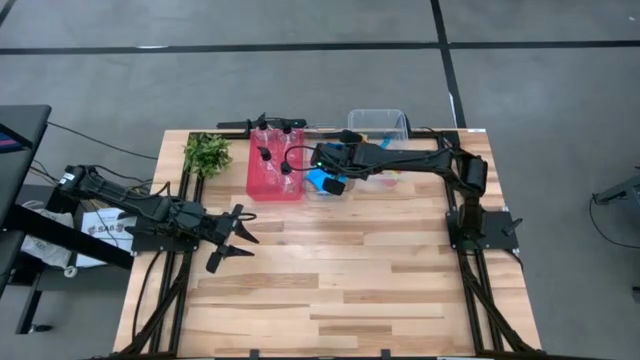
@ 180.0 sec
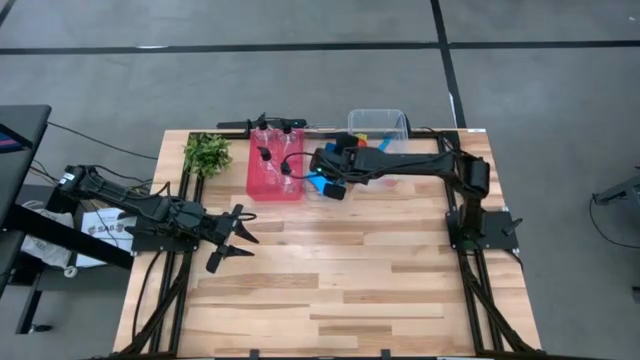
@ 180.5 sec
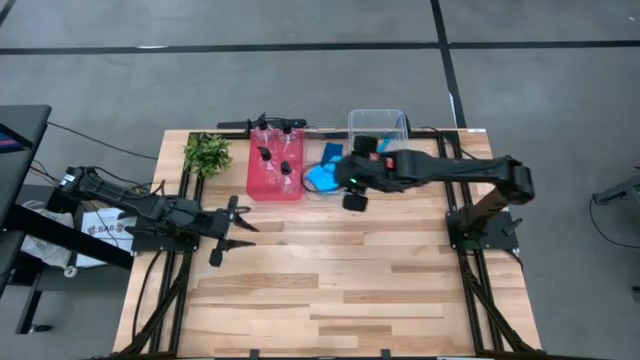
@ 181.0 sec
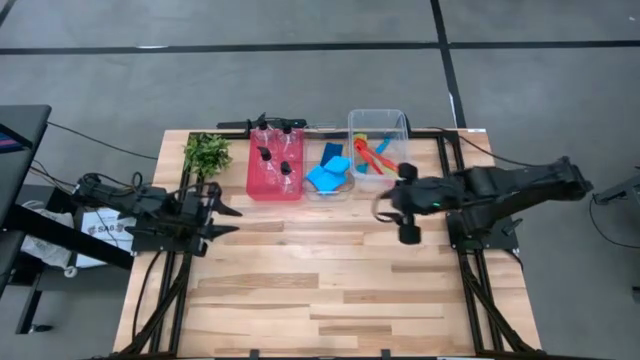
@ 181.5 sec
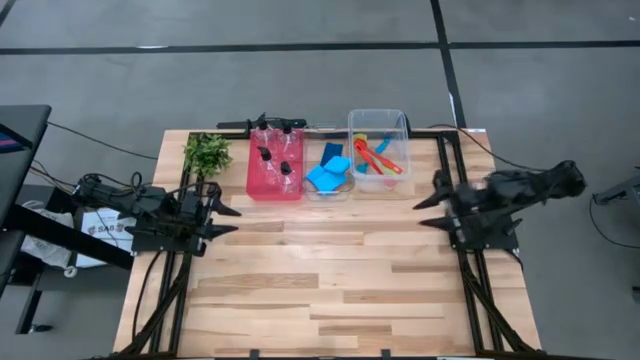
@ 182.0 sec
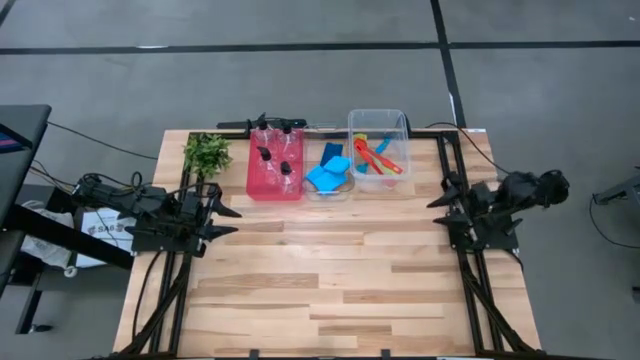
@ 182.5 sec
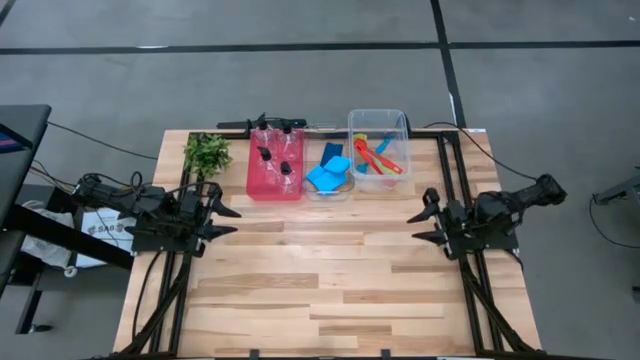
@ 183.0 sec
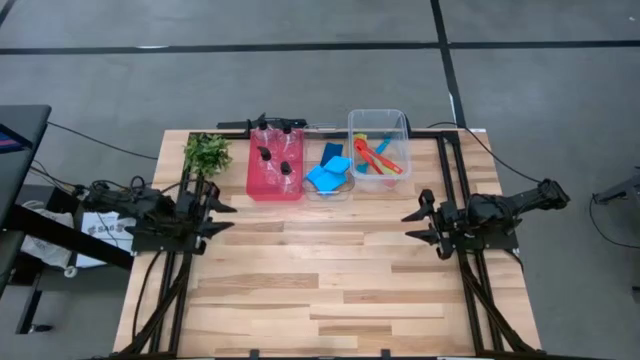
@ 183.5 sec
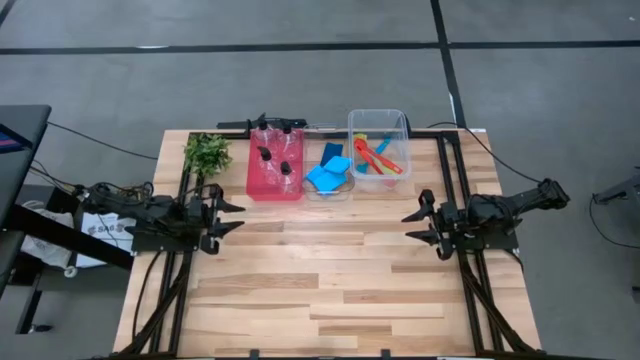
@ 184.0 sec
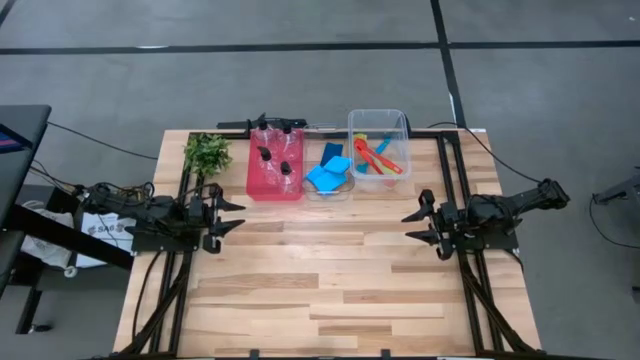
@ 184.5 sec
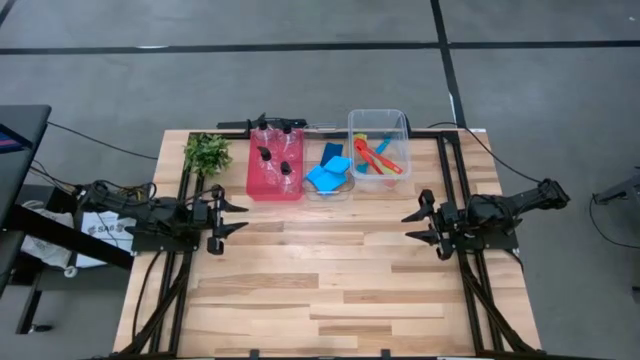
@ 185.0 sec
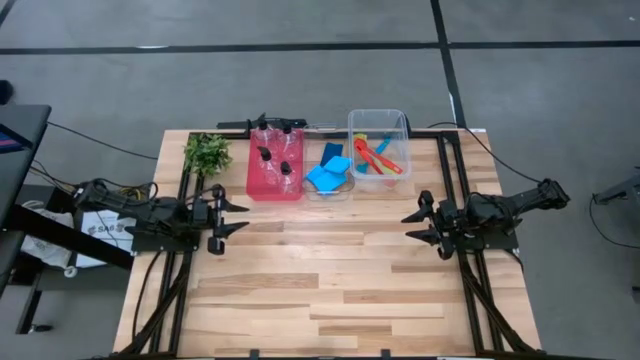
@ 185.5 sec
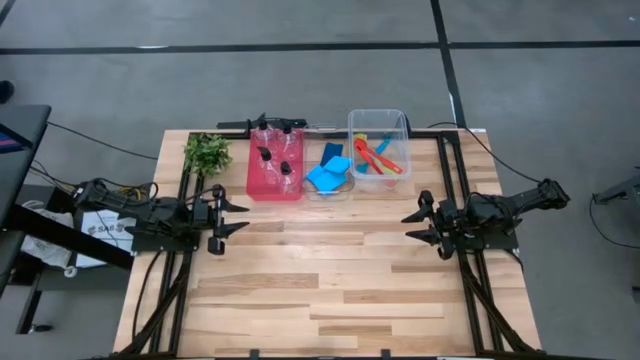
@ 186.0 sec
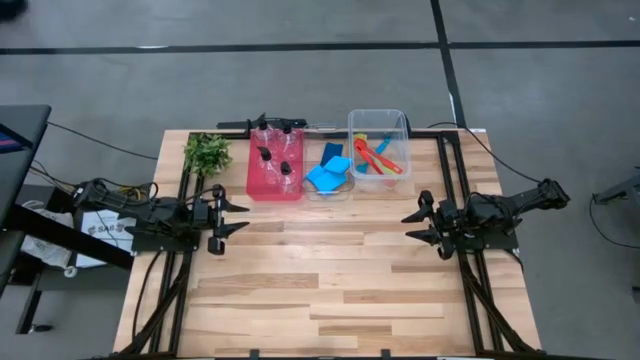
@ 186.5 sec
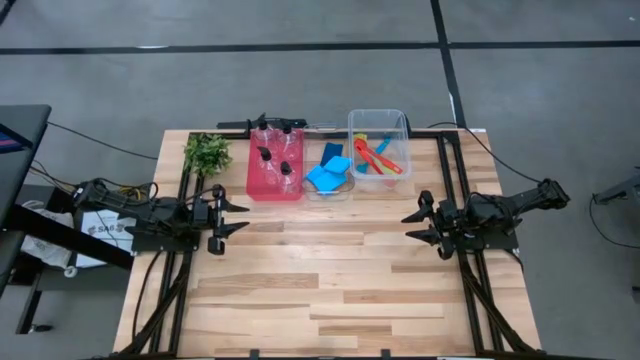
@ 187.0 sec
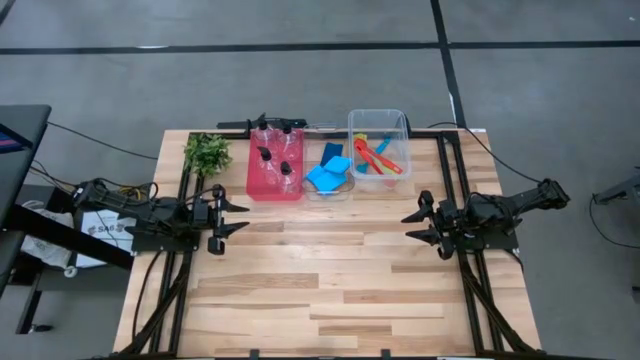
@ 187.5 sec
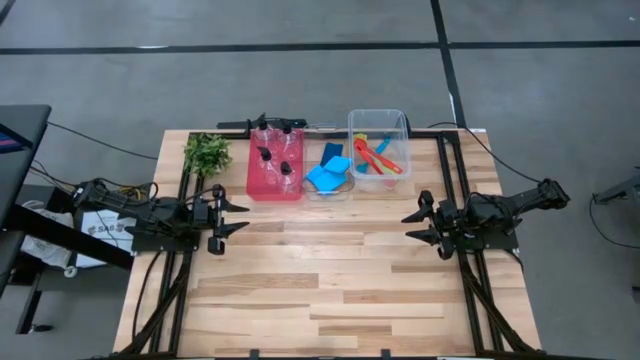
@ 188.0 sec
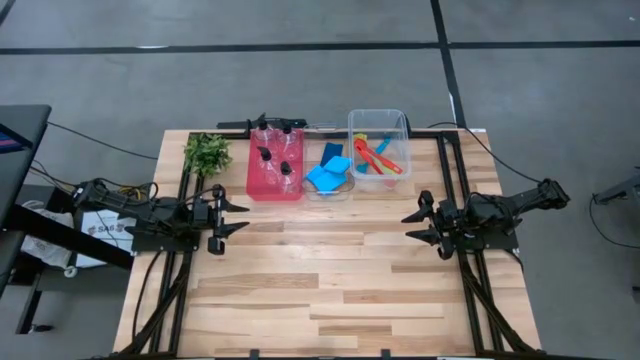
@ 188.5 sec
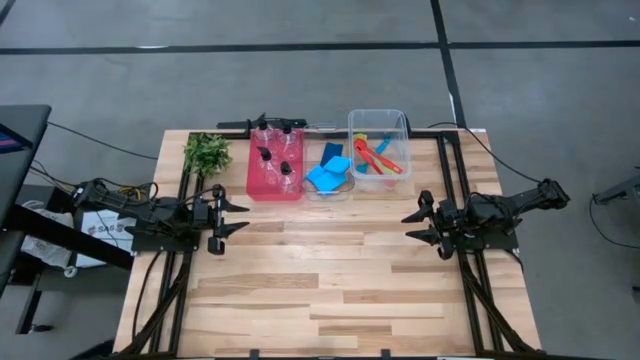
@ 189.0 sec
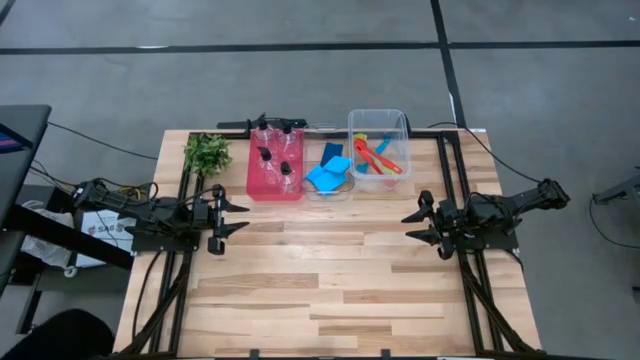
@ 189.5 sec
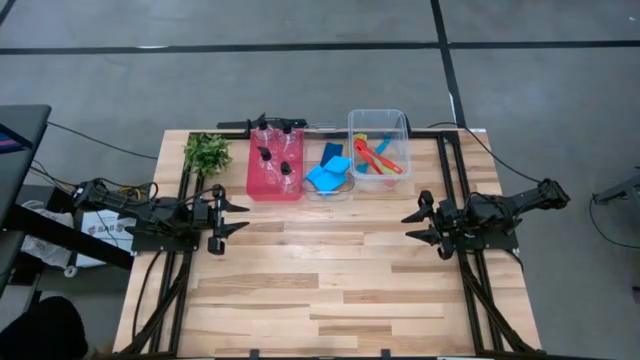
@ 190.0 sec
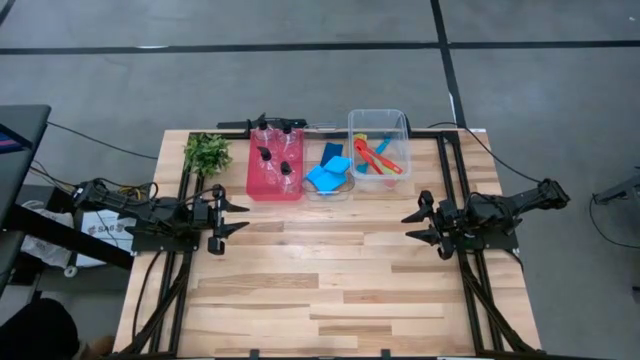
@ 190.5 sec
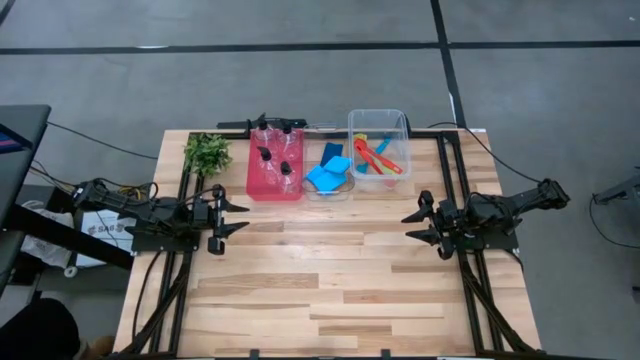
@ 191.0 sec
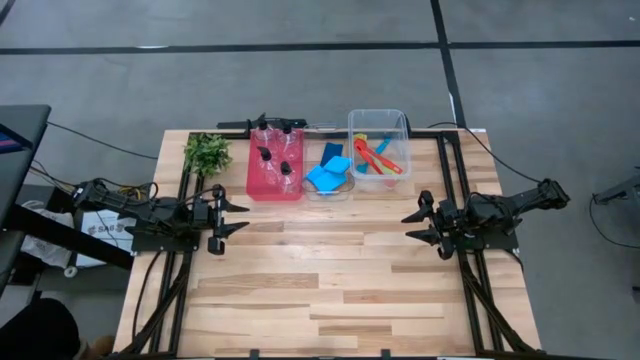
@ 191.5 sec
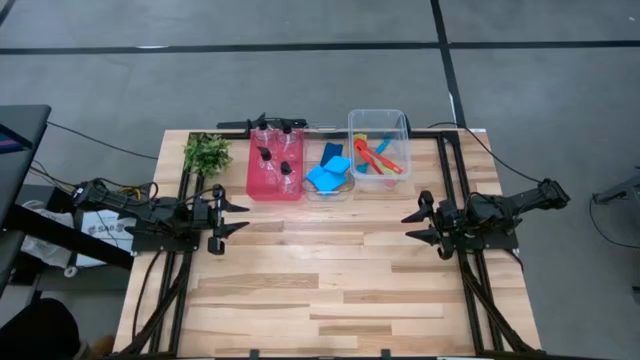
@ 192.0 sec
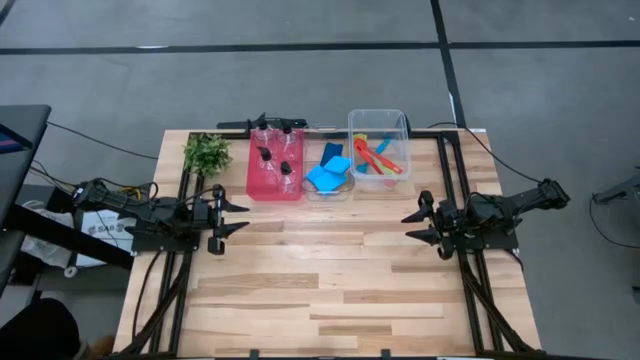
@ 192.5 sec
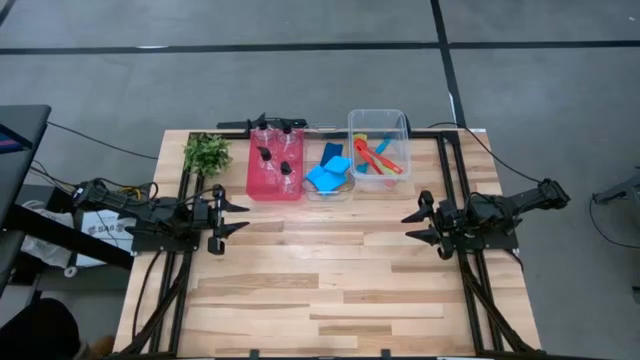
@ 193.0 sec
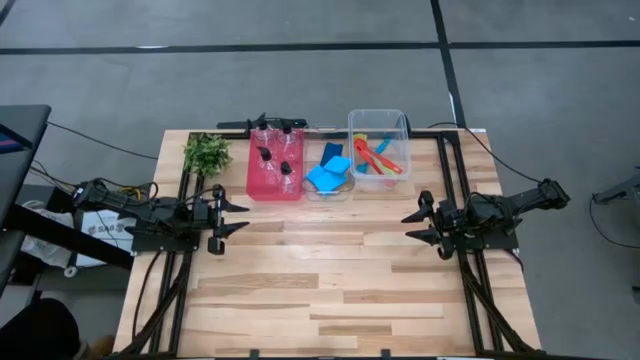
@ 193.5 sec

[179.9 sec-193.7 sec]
Task: Pick & Place Kitchen Sink Supplies
Return to Home Position

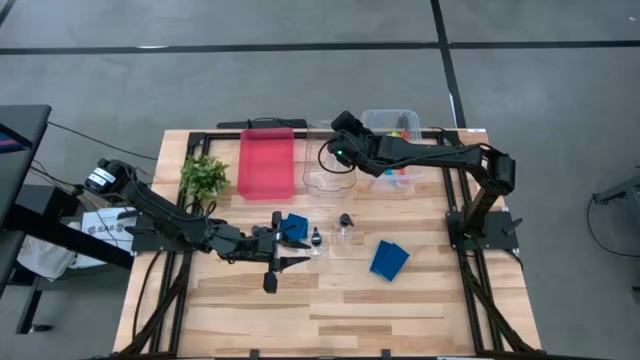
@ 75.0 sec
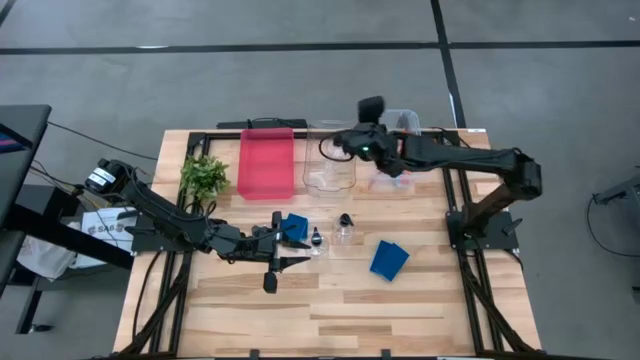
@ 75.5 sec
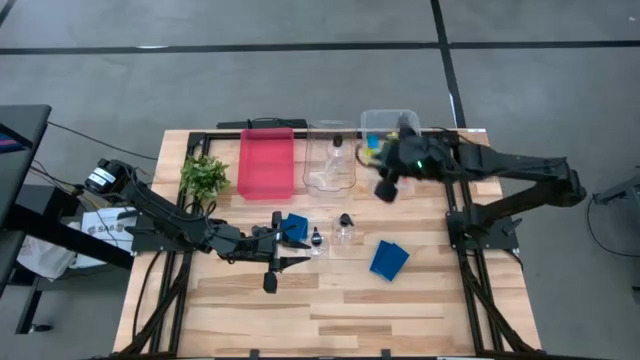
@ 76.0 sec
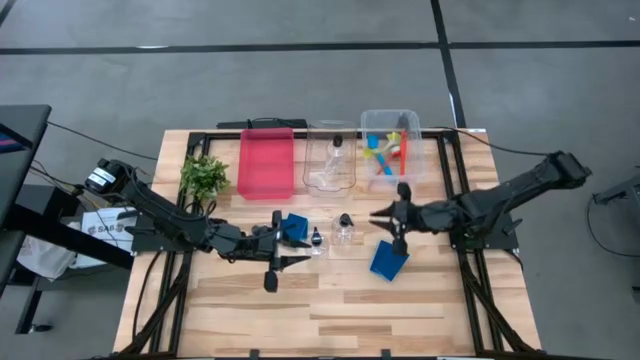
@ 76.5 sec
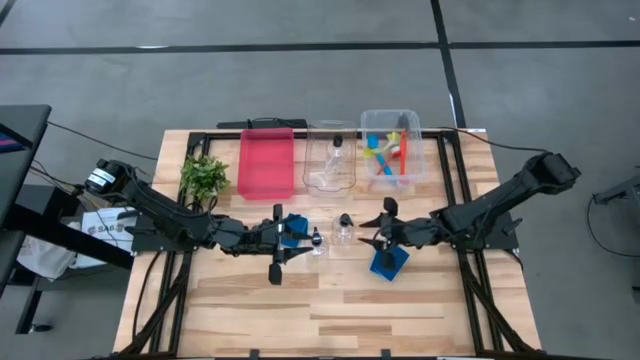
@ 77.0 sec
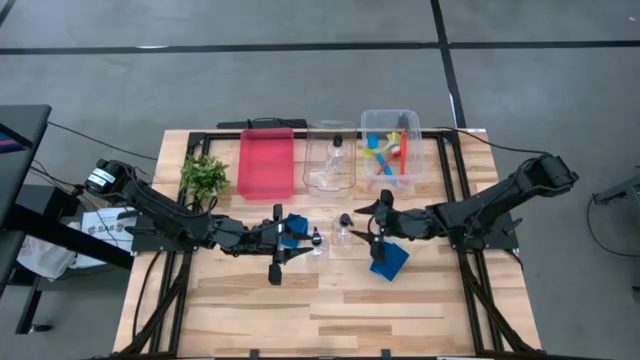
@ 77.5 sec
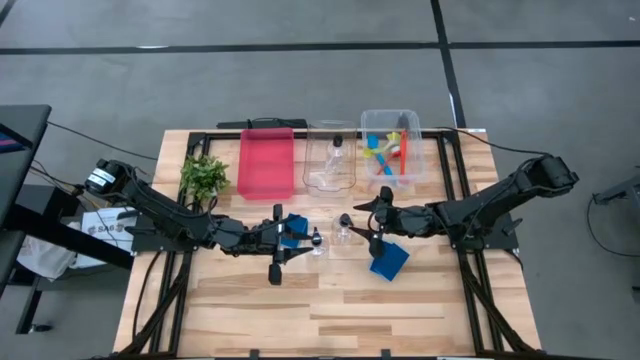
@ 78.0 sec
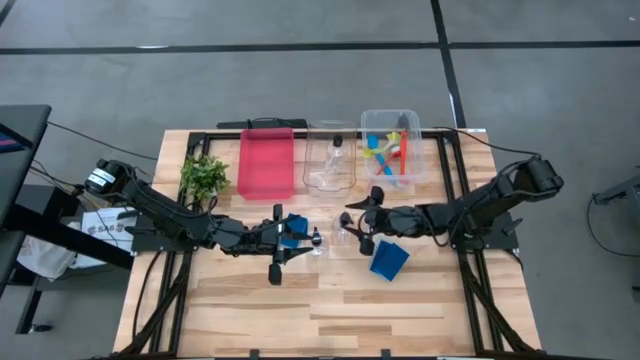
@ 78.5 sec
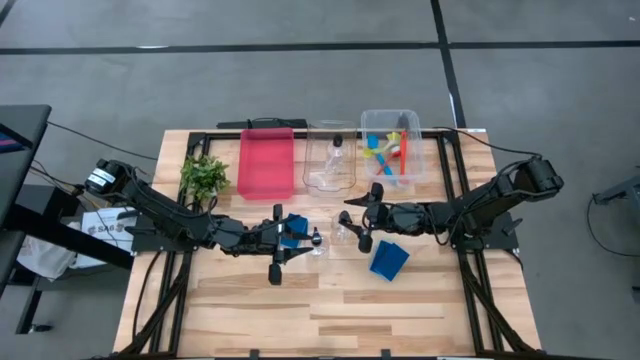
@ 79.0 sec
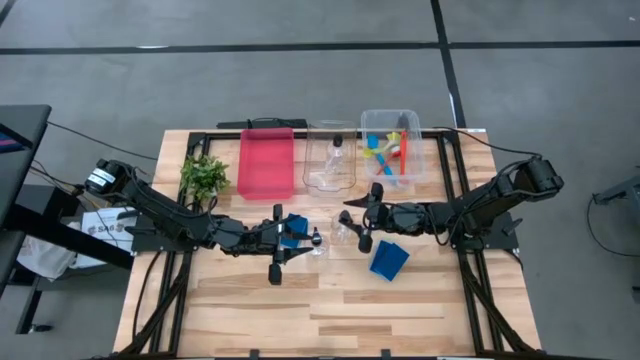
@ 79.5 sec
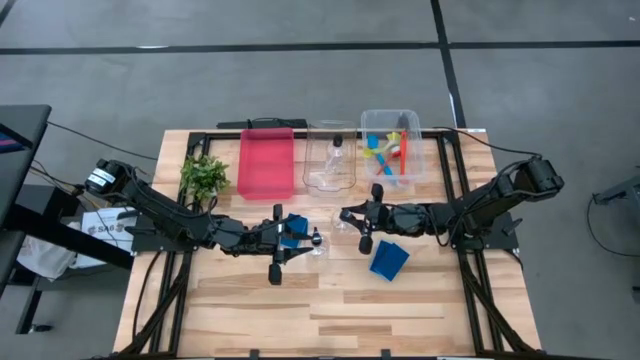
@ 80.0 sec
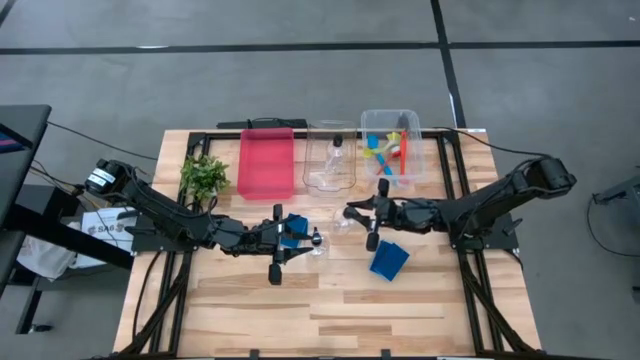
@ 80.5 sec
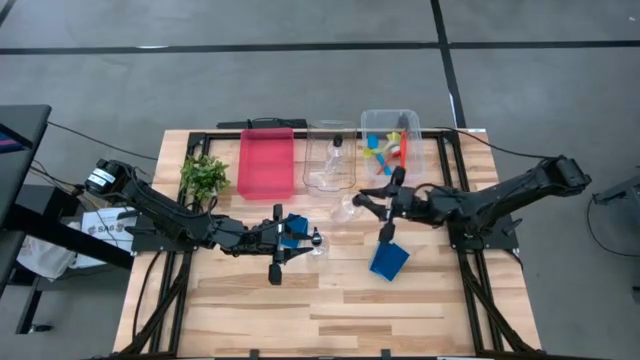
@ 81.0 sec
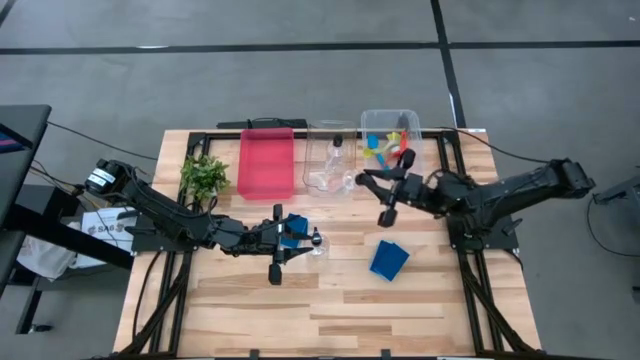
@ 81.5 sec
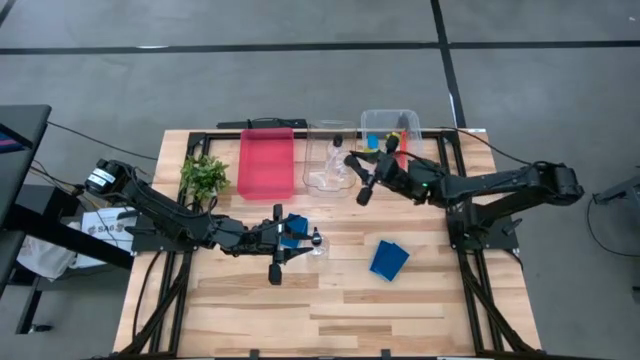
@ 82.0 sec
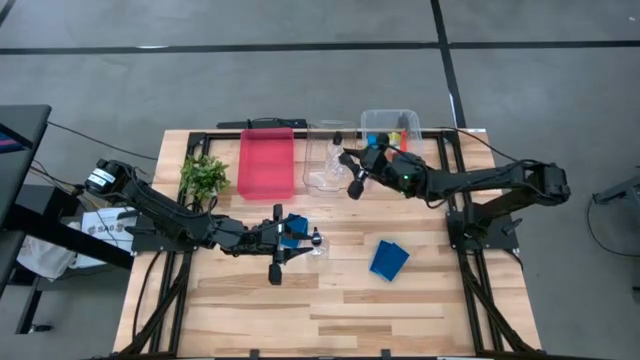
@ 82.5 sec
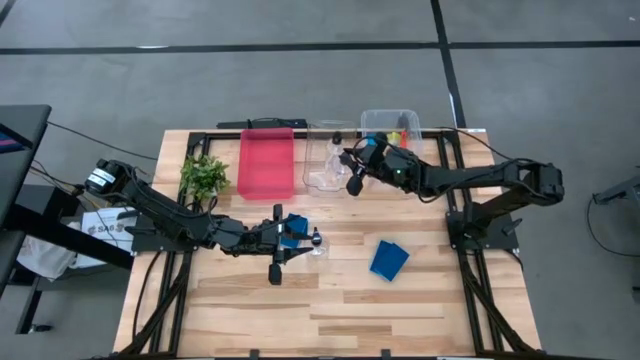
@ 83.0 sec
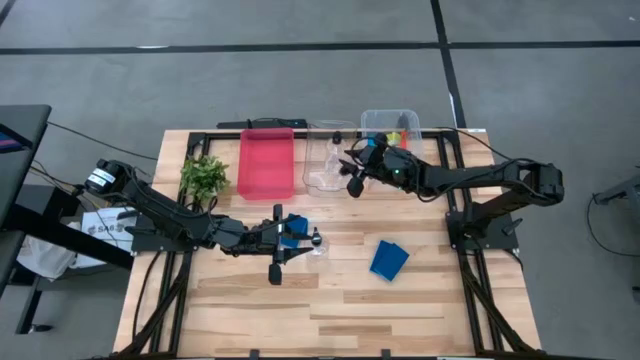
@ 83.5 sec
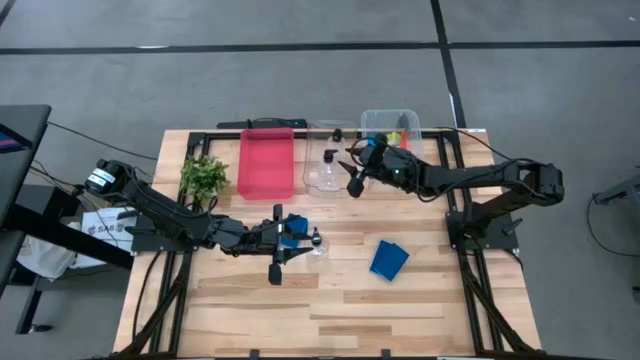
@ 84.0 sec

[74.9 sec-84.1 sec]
Task: Pick & Place Kitchen Sink Supplies
Put the soap dispenser into the transparent bin
